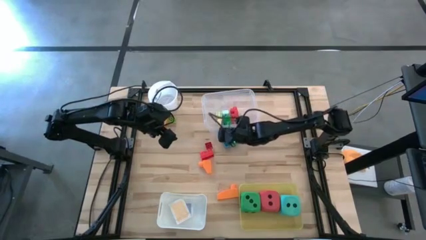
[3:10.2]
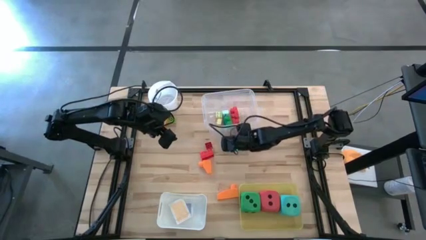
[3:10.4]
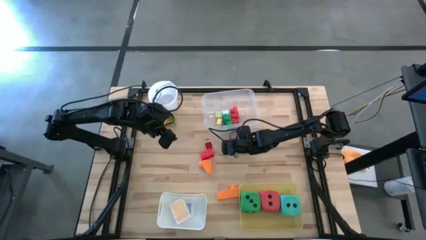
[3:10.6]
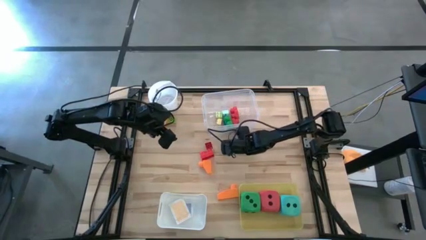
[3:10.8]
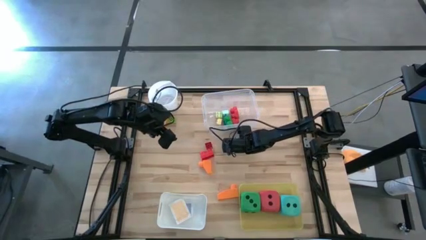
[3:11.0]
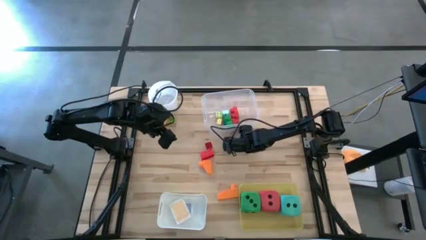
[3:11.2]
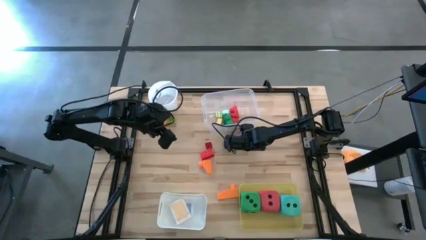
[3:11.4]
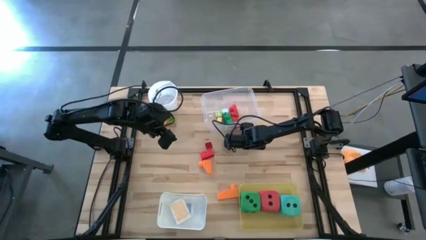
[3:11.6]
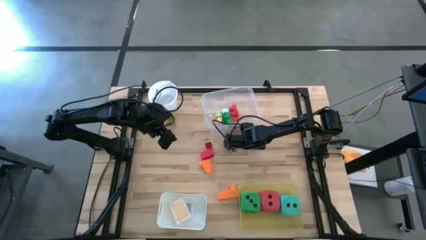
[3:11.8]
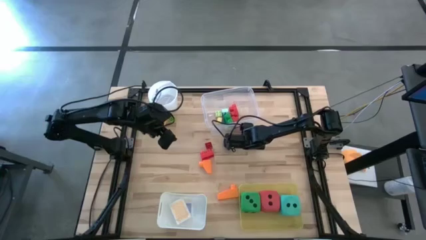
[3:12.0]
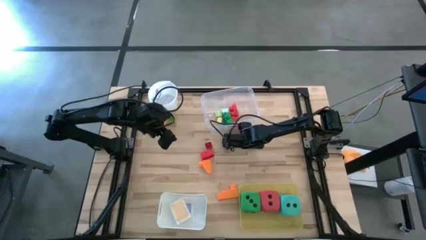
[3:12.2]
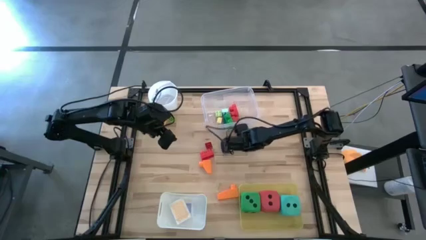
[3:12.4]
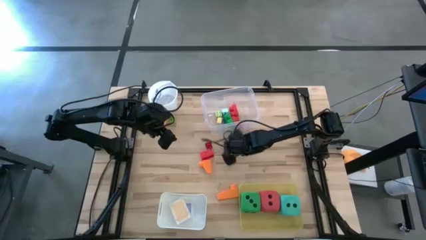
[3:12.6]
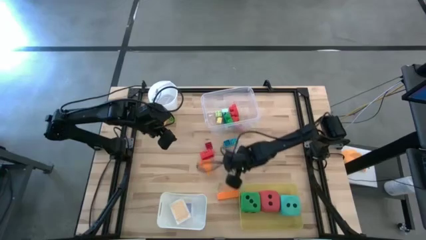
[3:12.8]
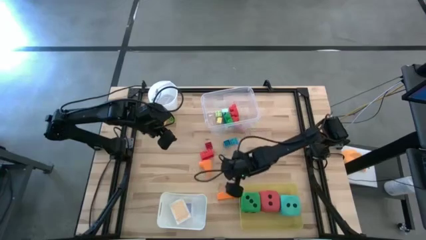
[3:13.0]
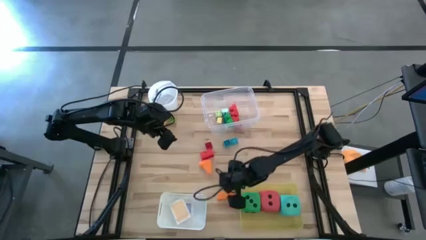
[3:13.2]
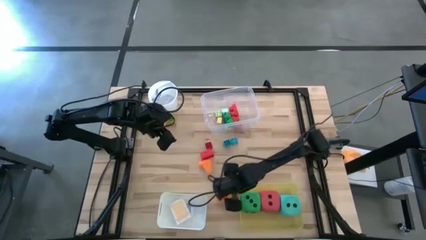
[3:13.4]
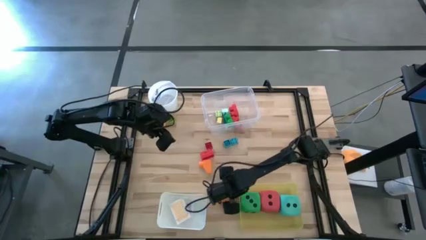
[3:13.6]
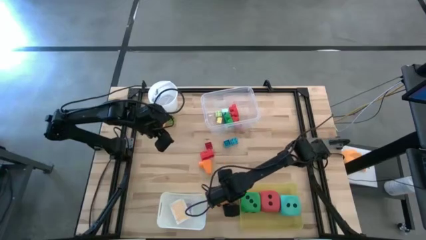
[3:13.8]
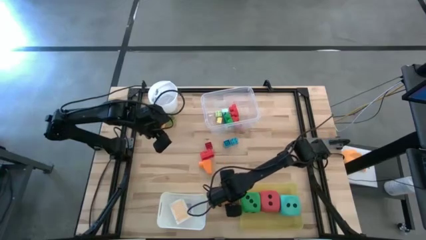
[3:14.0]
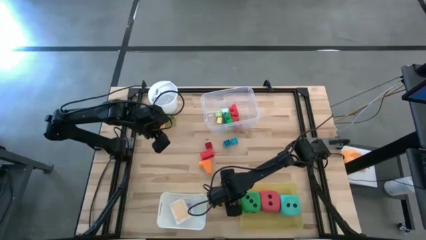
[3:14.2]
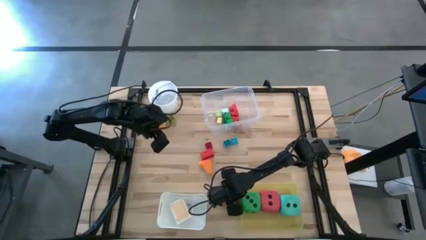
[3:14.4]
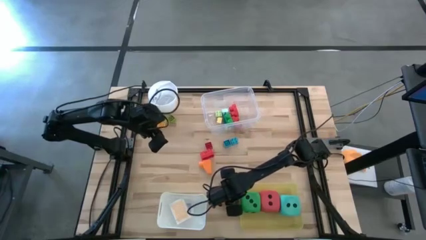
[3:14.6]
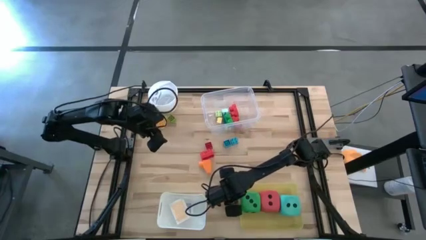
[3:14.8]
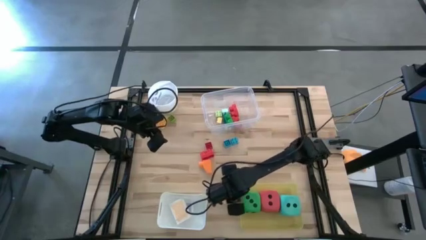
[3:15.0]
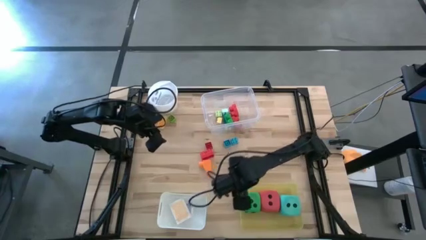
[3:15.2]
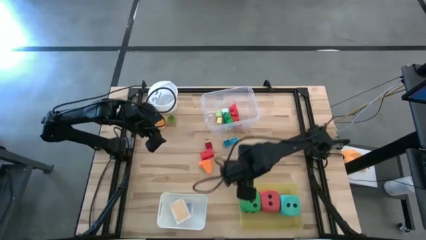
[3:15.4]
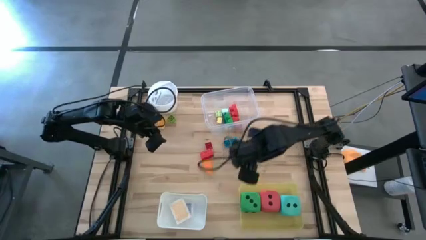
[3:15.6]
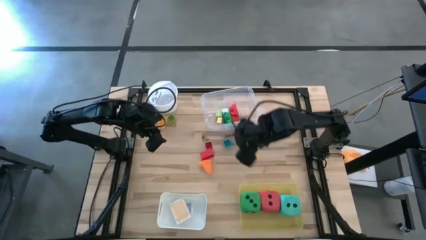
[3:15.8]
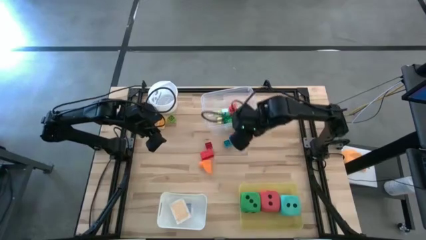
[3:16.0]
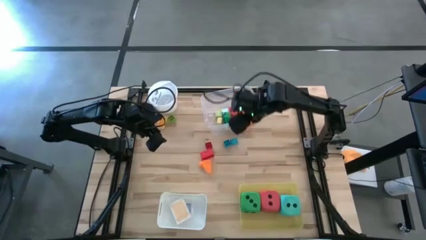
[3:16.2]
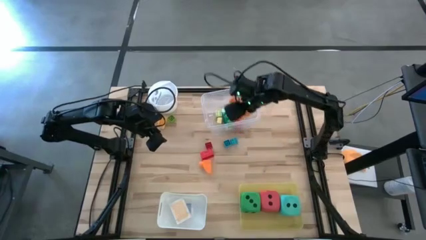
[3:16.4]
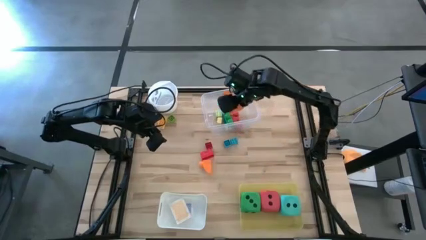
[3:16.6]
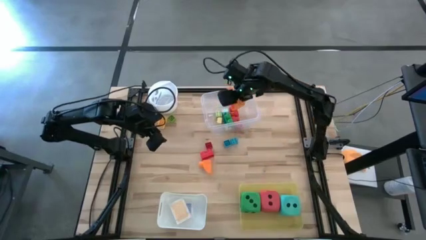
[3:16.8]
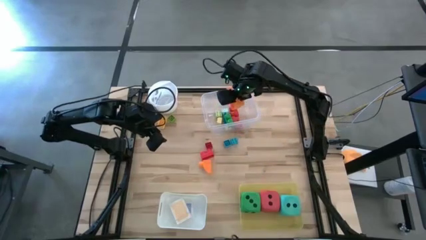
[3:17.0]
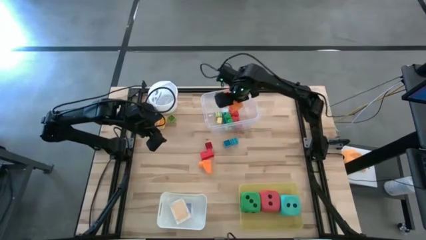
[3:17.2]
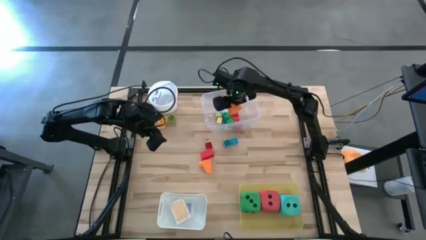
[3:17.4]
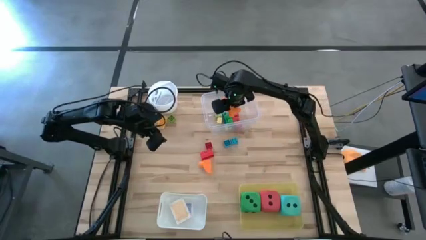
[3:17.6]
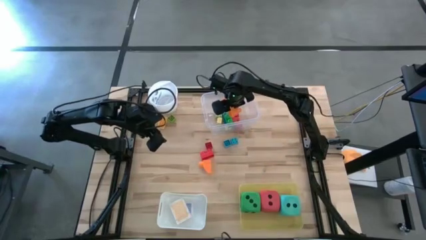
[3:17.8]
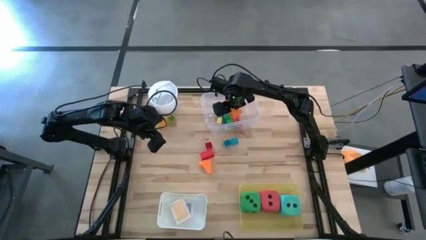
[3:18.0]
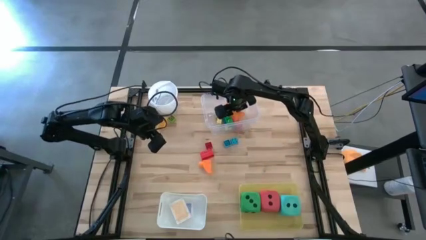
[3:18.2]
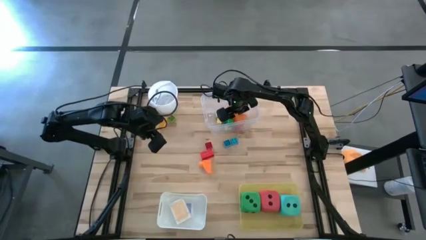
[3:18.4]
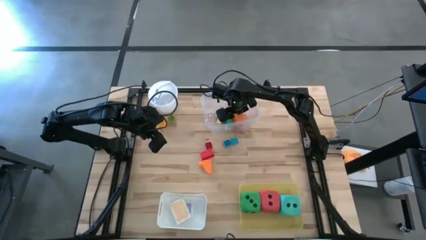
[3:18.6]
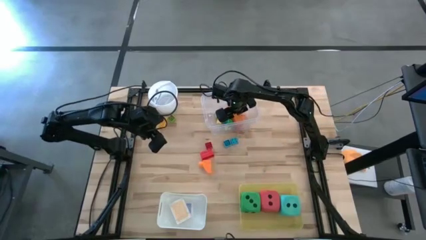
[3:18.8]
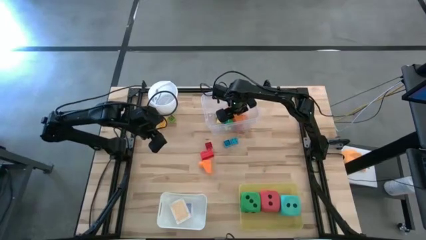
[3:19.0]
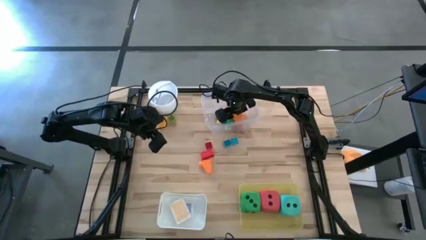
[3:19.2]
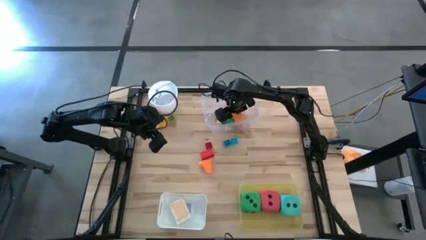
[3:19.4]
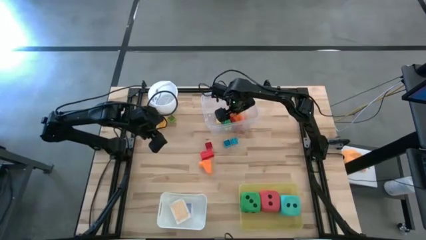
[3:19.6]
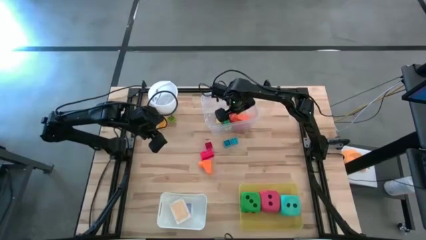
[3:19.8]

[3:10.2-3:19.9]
Task: Pick & Place Toys
Put the orange game piece into the transparent bin

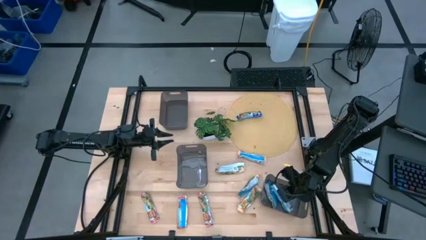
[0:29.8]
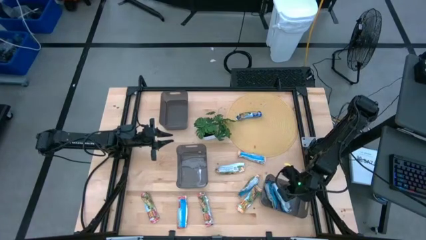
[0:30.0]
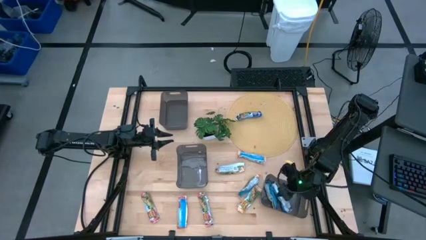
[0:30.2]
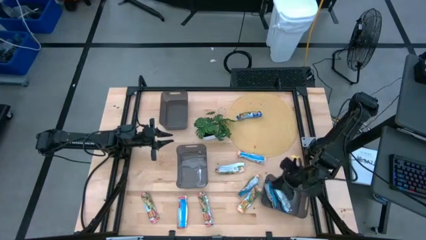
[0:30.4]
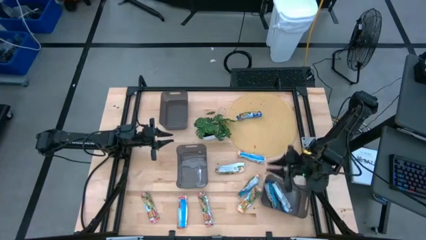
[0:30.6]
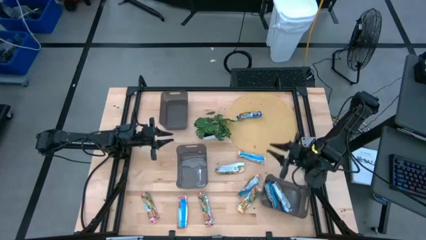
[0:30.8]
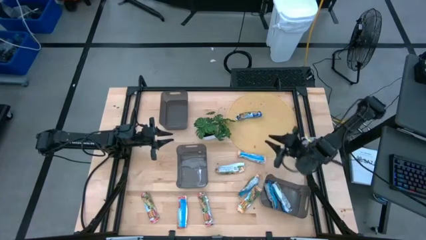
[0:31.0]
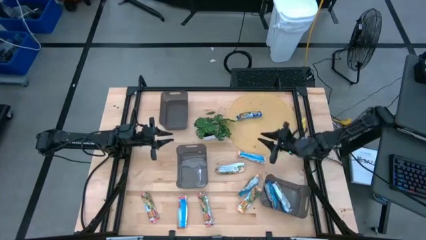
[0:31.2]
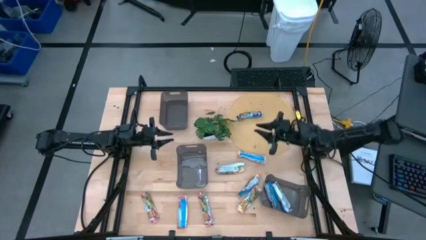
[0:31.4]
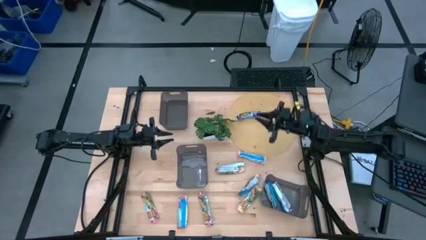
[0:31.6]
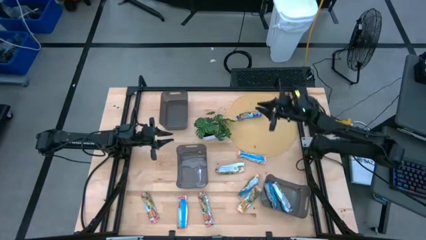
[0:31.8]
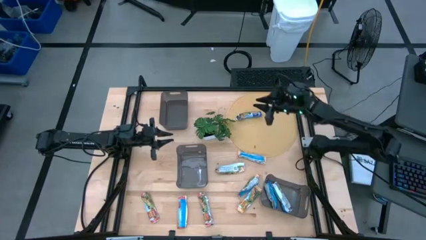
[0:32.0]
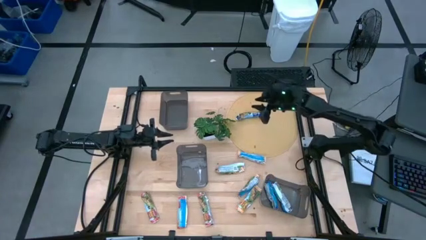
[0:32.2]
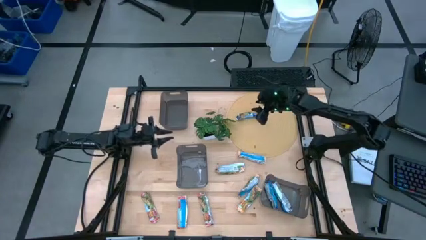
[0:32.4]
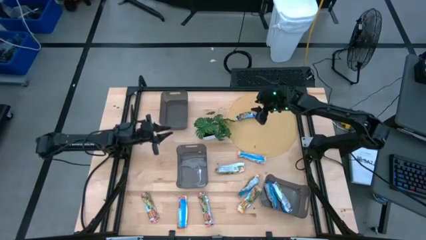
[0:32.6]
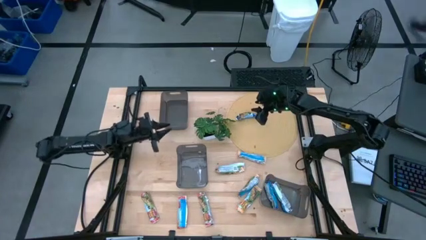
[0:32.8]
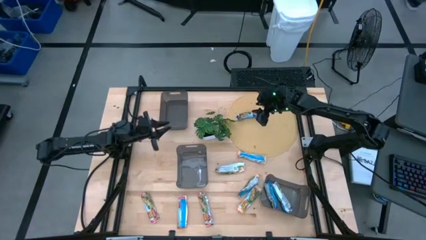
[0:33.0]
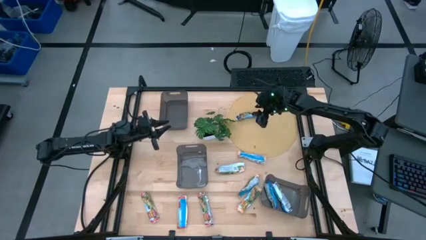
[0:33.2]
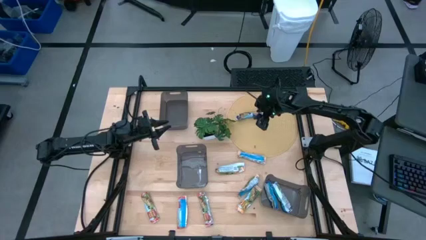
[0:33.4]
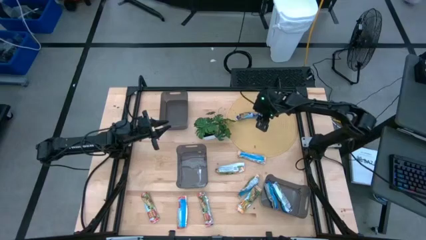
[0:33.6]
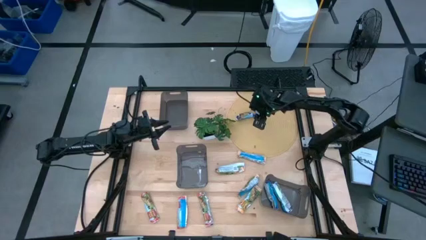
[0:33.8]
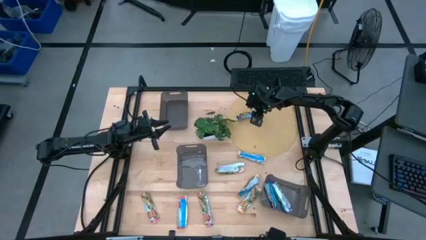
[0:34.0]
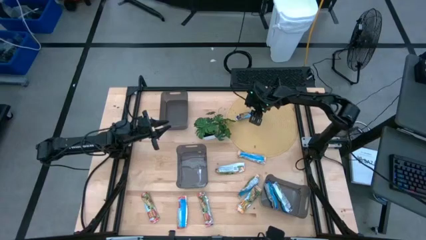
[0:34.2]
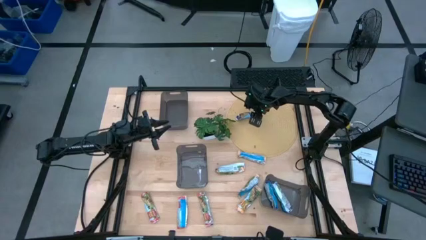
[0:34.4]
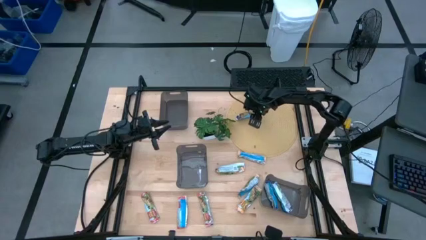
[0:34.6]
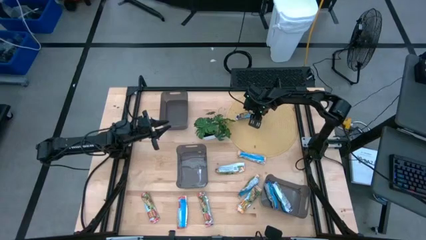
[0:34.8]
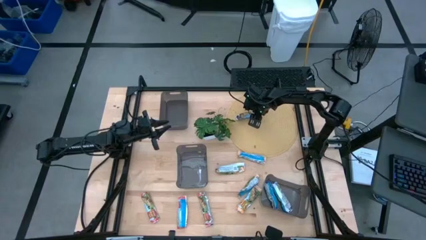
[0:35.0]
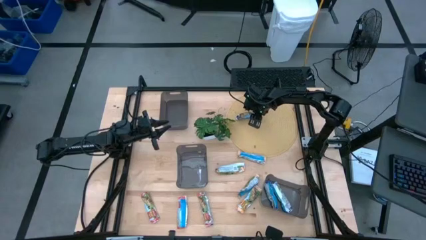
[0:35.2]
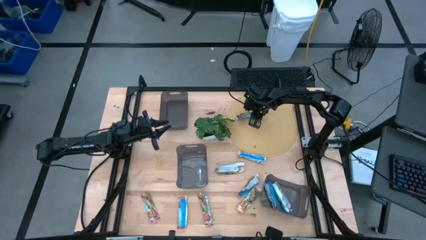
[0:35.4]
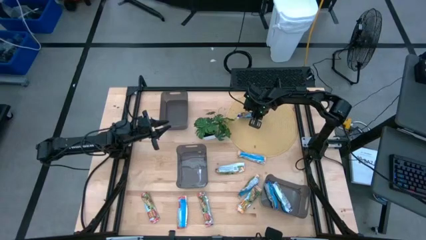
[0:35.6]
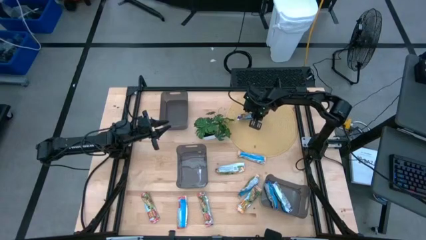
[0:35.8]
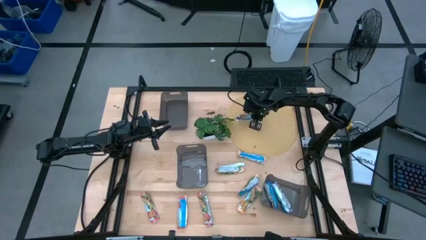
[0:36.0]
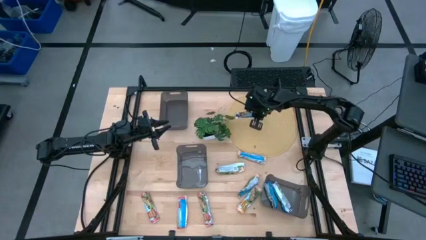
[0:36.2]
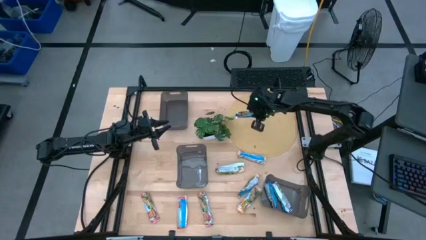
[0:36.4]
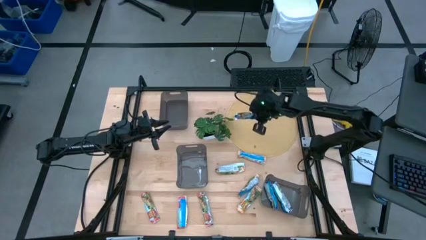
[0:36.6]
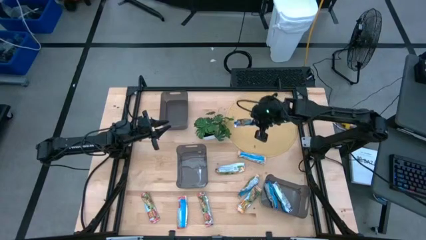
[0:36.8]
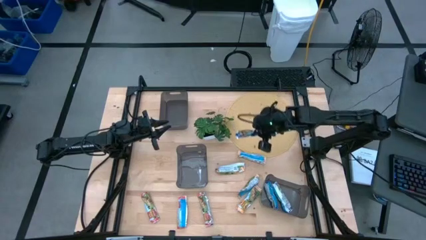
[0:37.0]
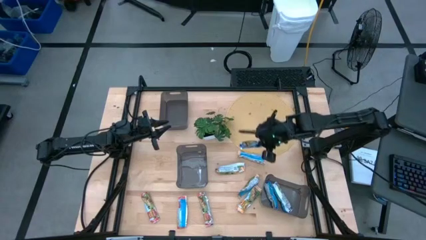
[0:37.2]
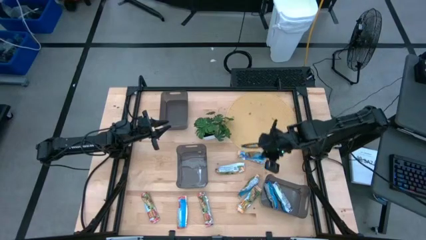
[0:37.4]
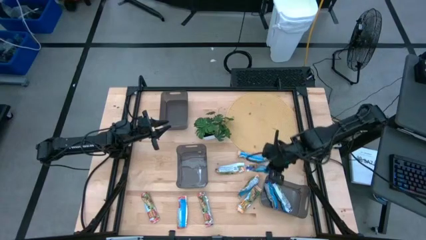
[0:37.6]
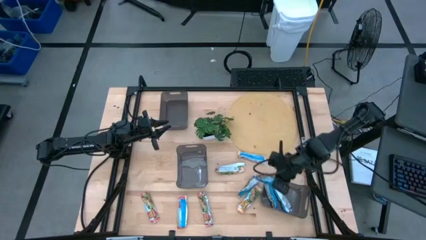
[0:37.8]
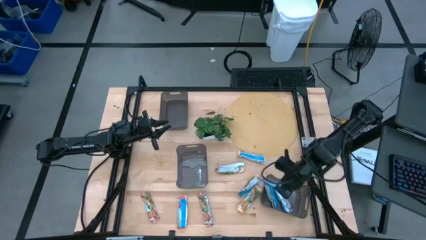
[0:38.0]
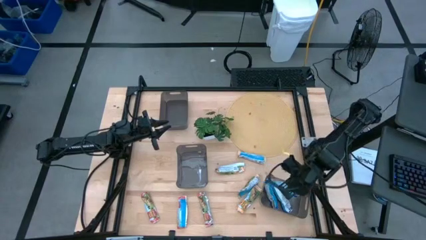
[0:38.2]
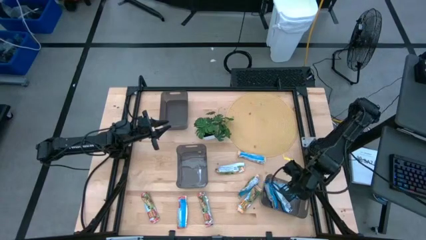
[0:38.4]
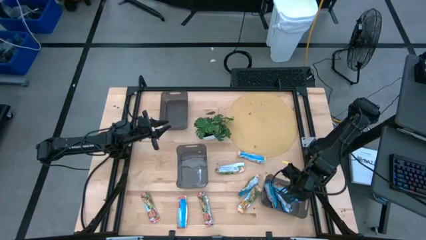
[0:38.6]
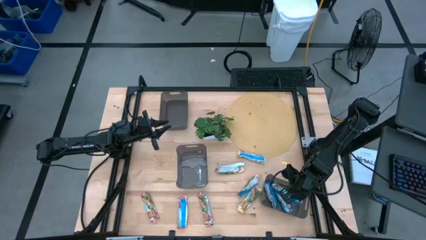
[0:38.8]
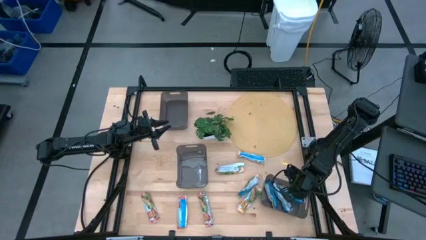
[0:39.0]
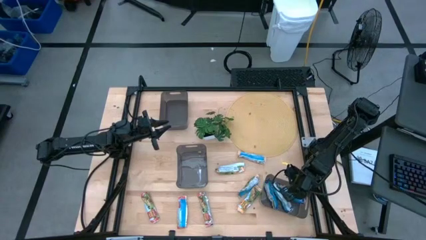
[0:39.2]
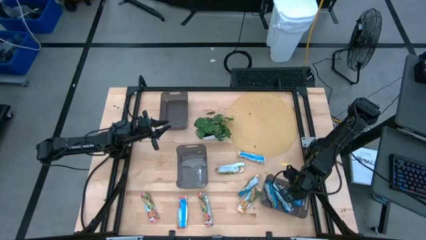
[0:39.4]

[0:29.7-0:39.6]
Task: Pick and place Granola Bars by type
Put the blue granola bar into the bottom right black bin
